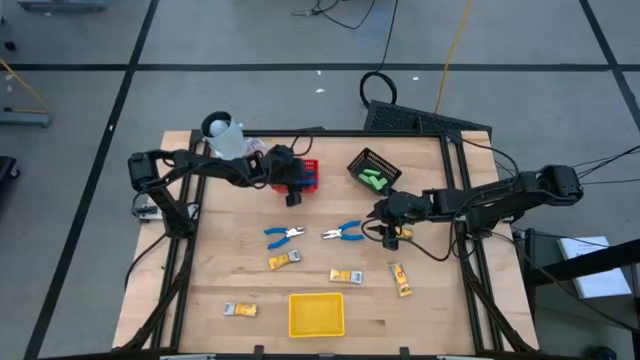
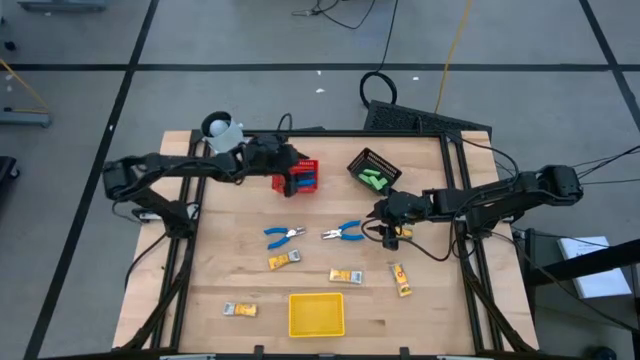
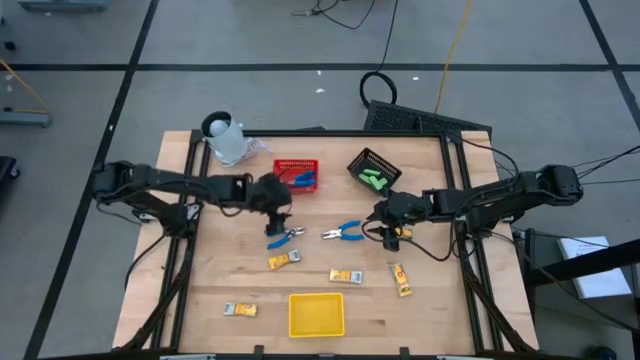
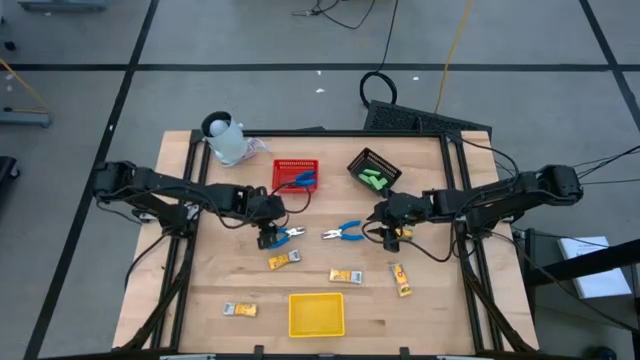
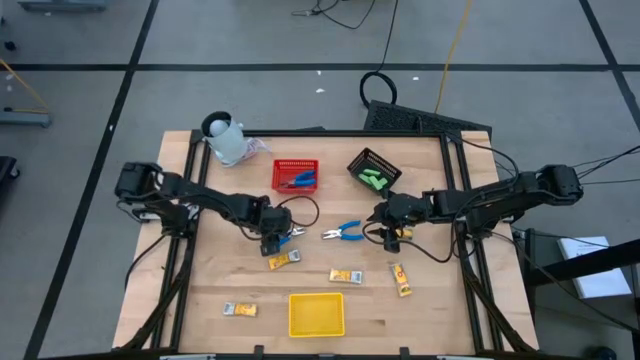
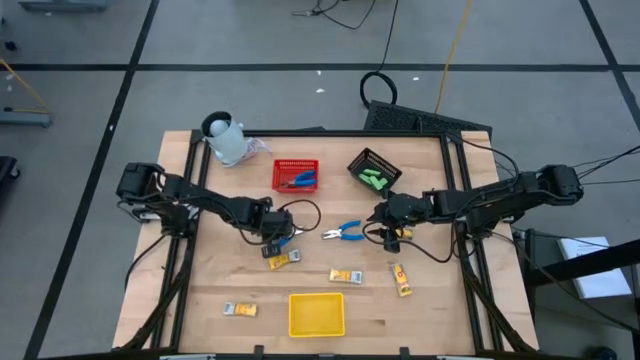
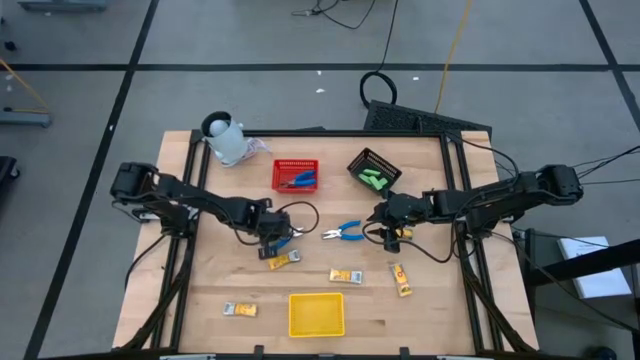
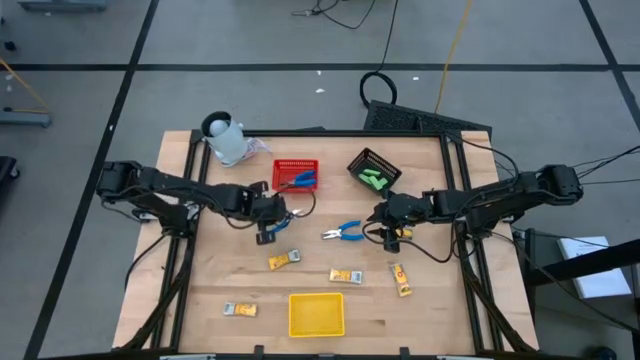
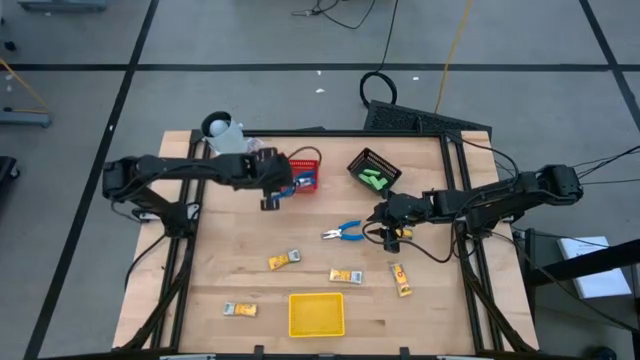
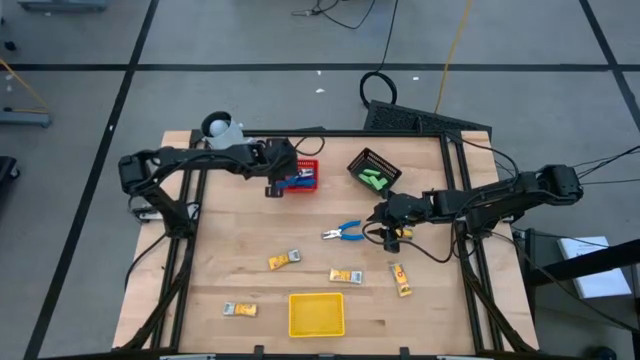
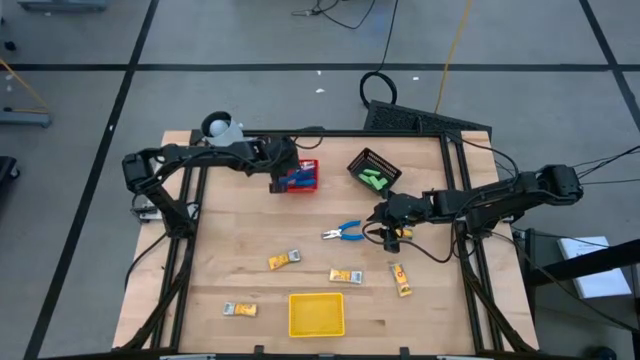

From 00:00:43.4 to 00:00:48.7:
Task: Pick & Place School Supplies
Put the blue hole puncher into the red bin

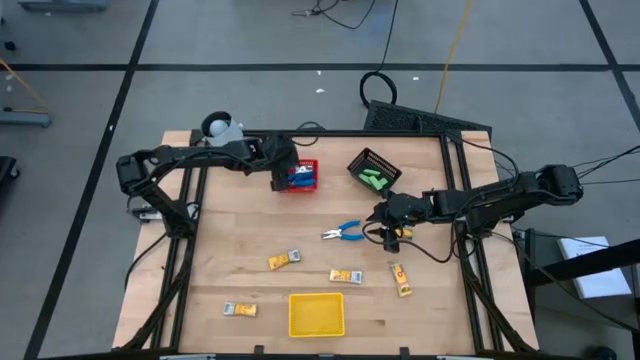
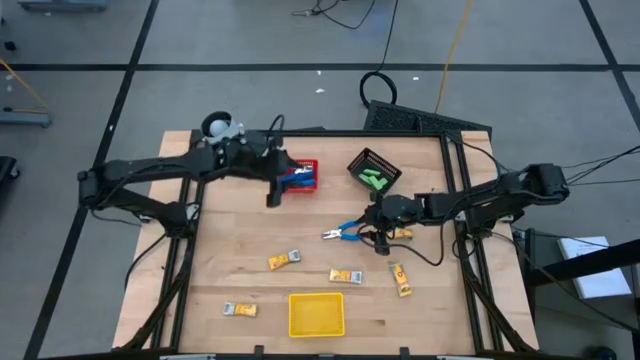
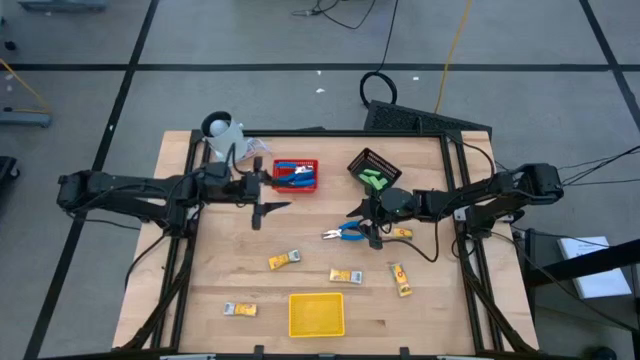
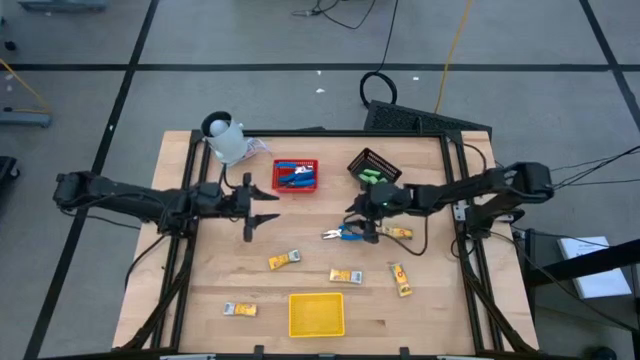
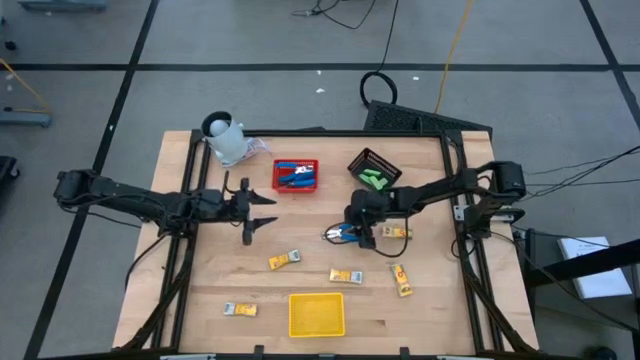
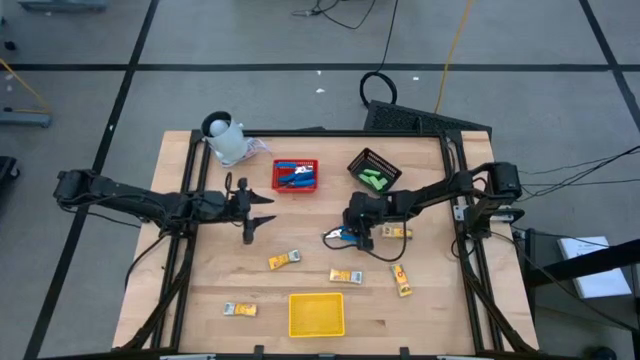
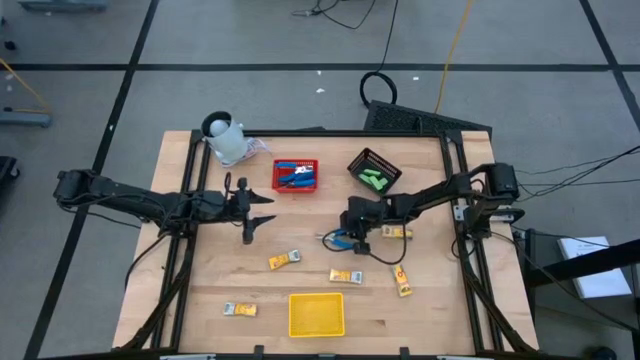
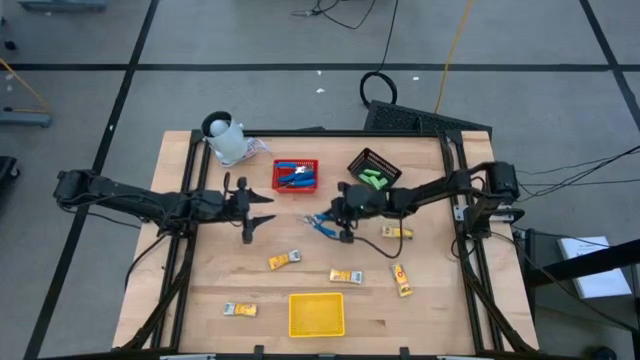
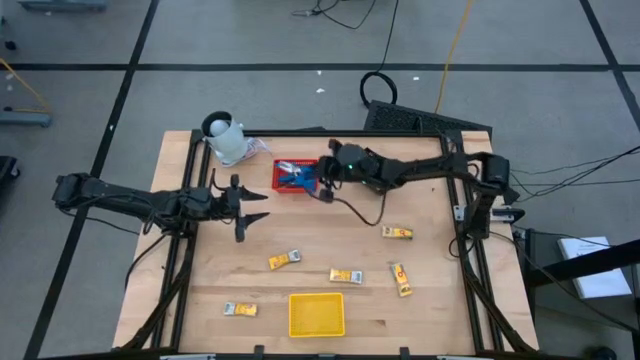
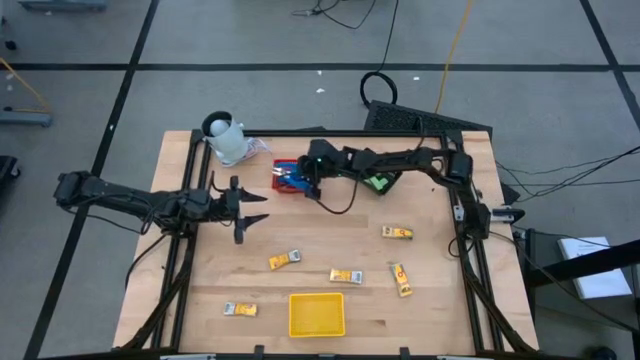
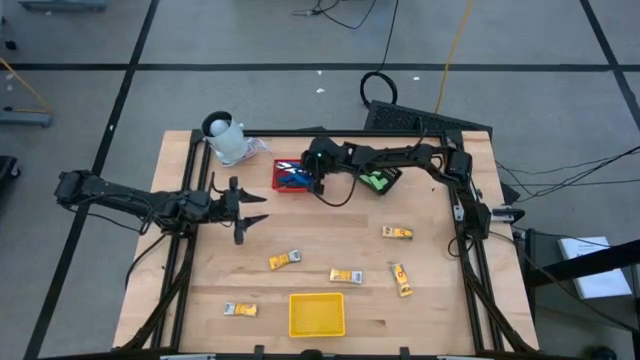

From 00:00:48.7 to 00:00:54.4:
Put the blue hole puncher into the red bin

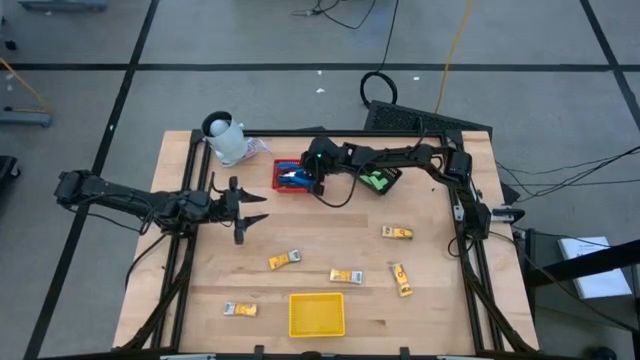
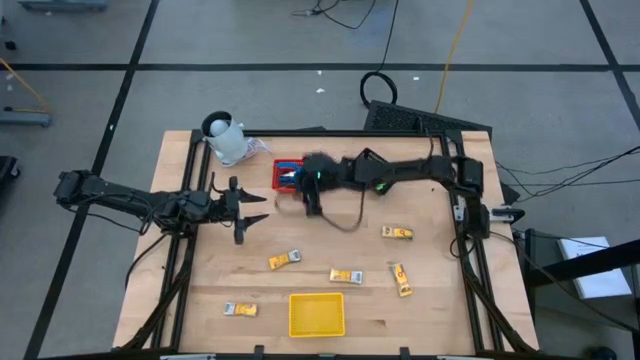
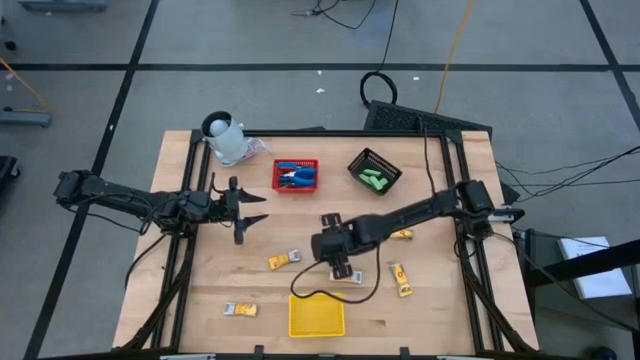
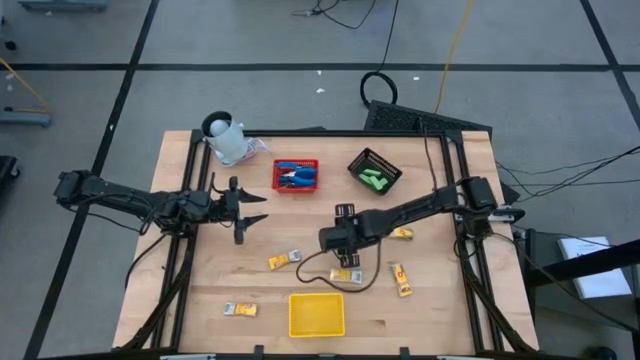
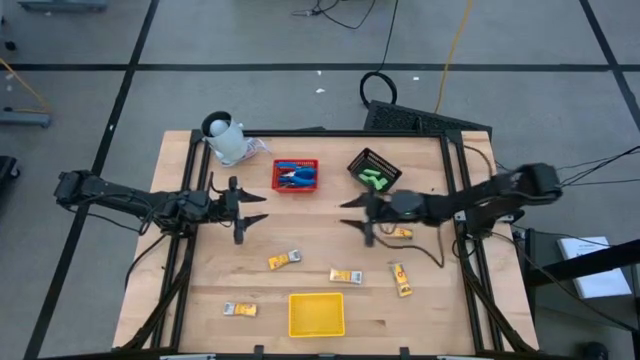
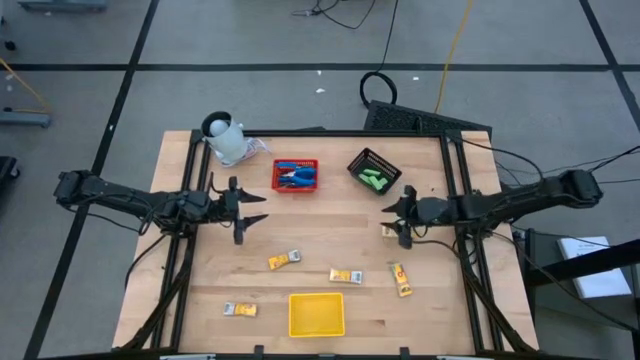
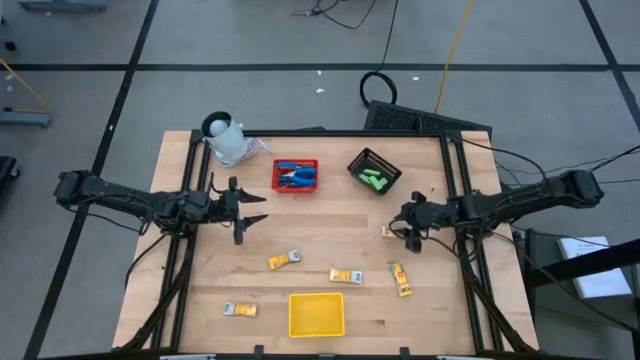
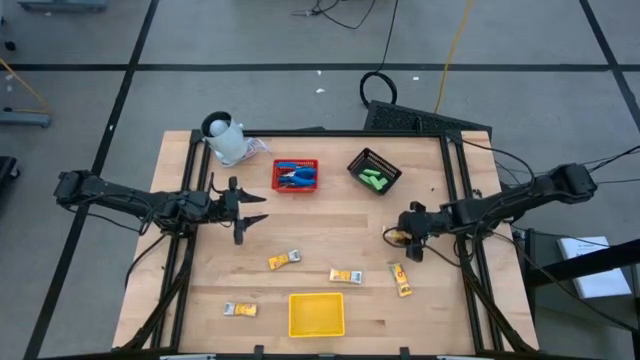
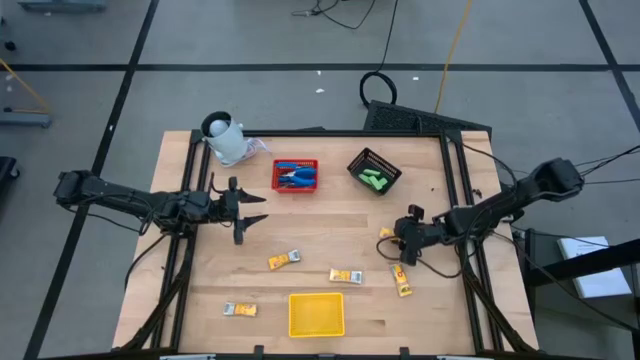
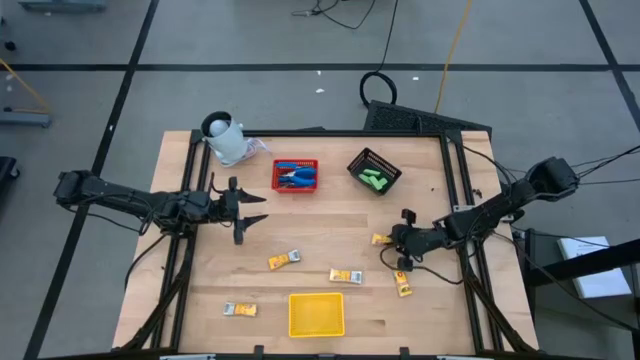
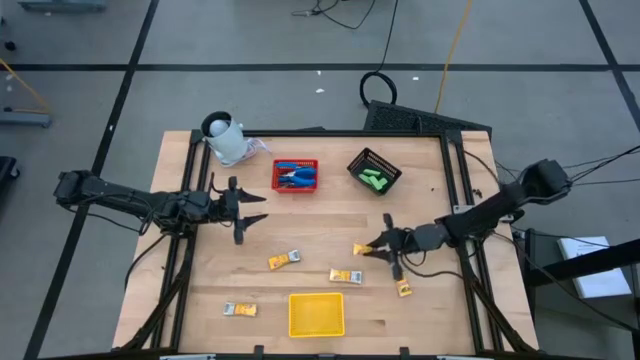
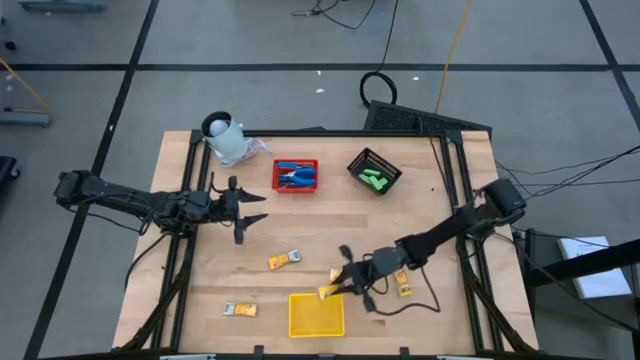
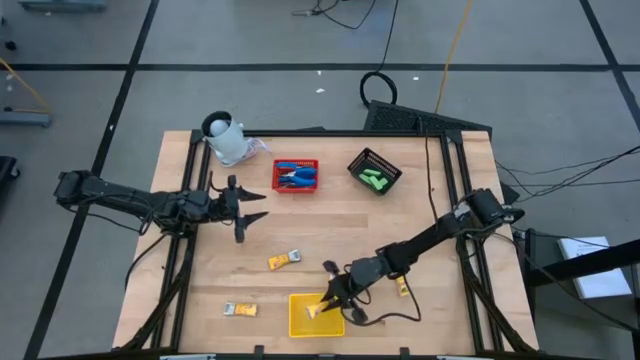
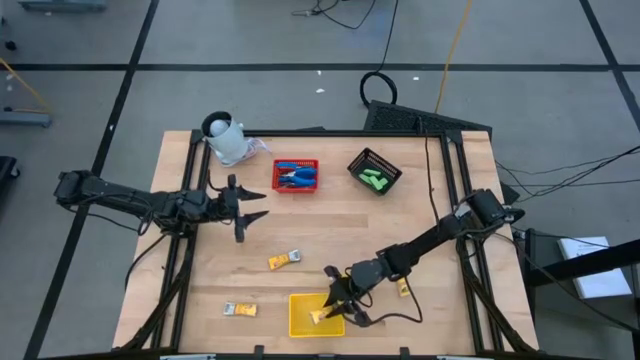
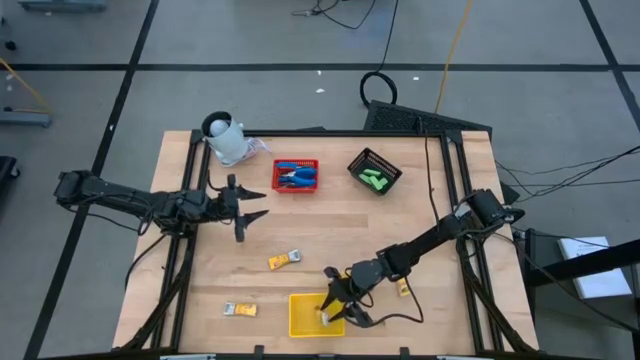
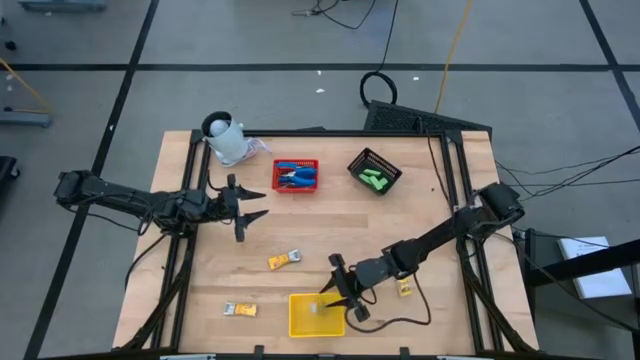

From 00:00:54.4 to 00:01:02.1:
Put the yellow crayon box into the yellow bin
